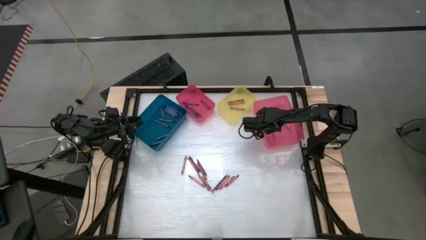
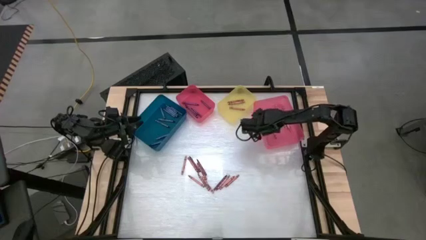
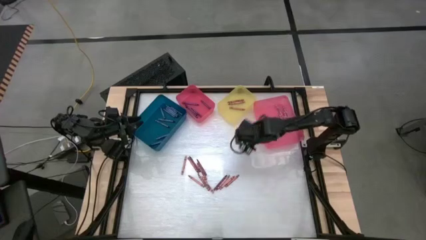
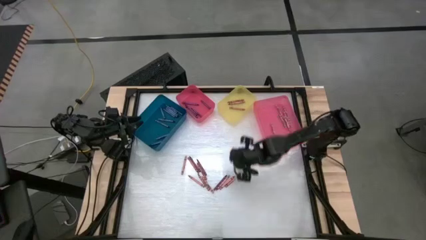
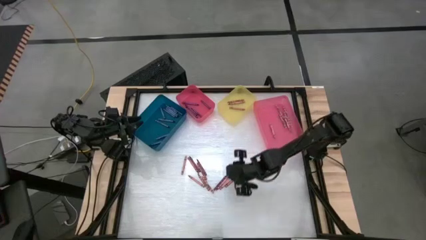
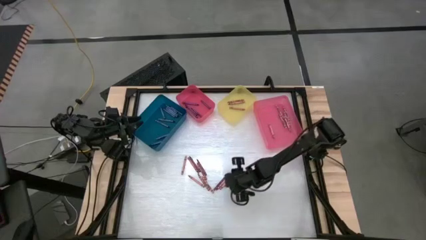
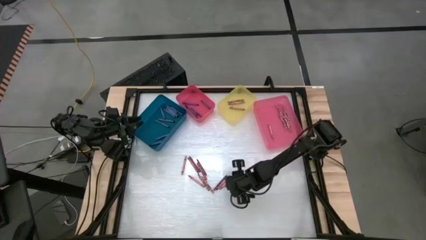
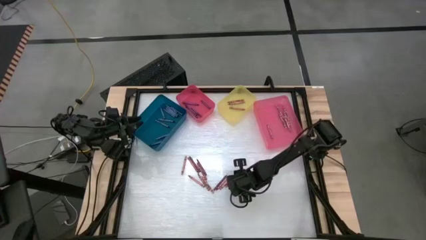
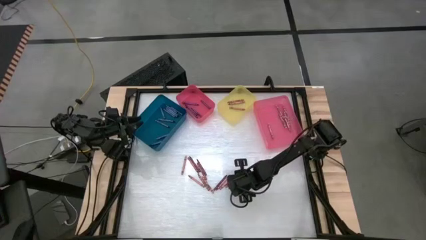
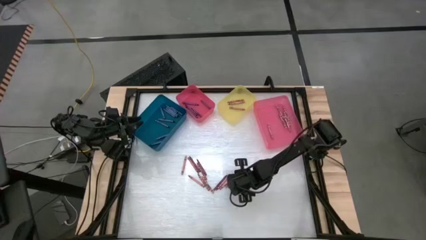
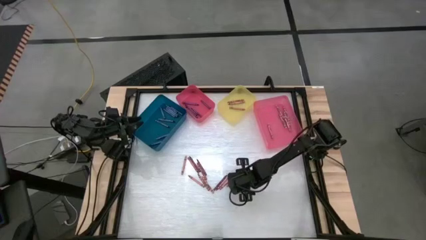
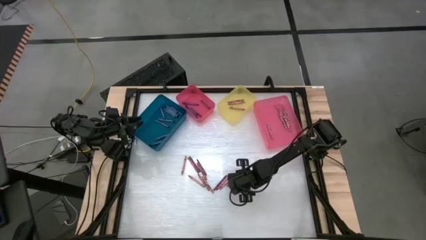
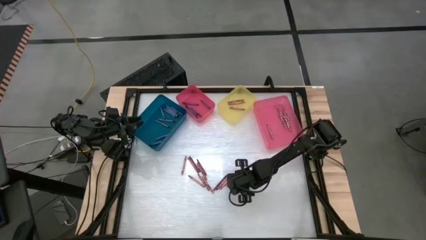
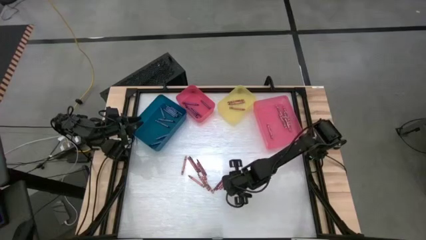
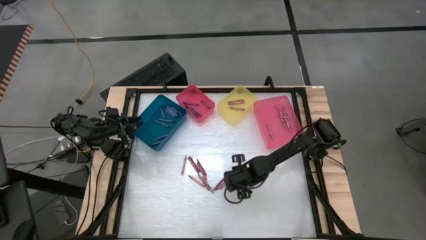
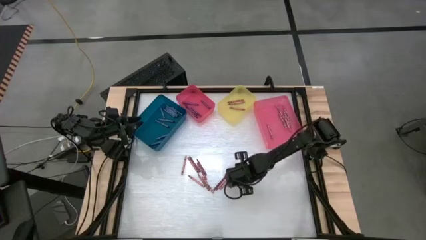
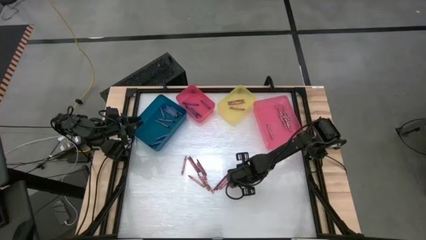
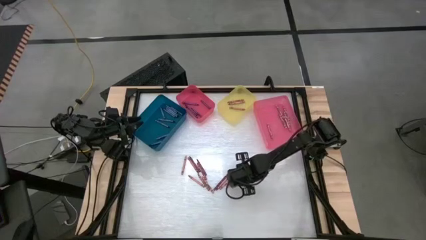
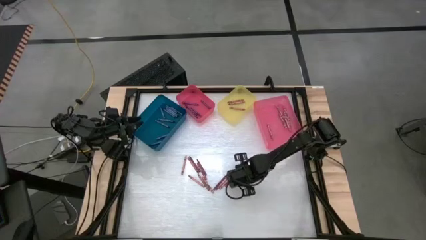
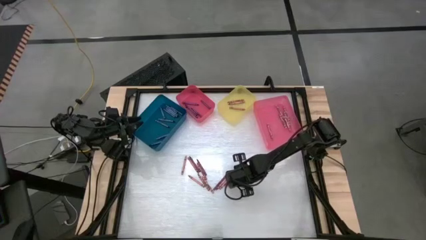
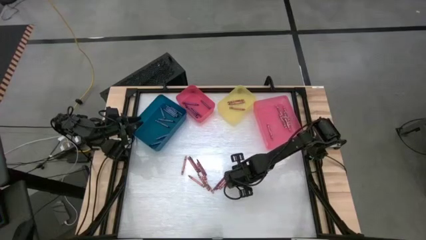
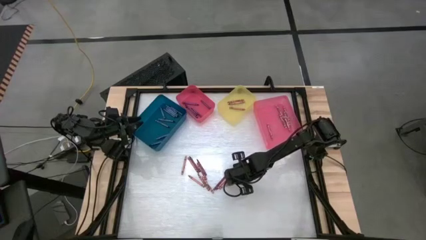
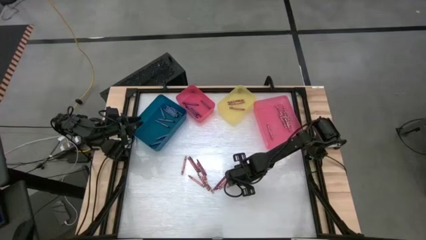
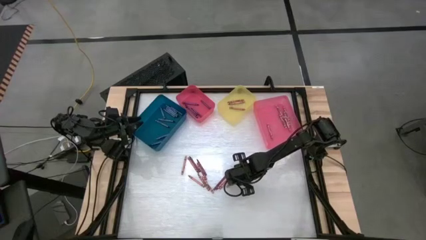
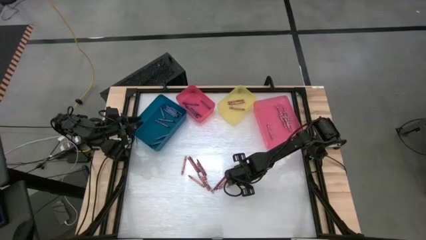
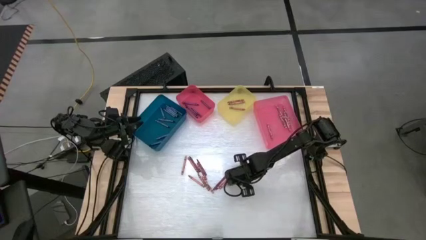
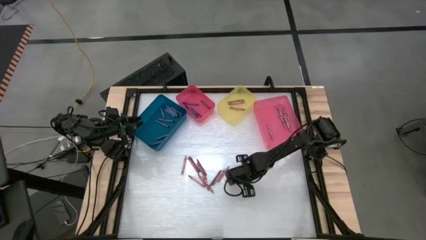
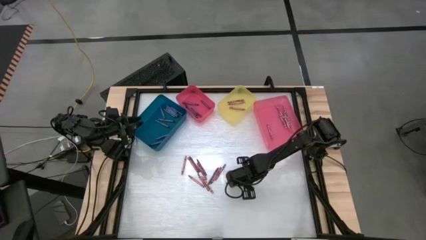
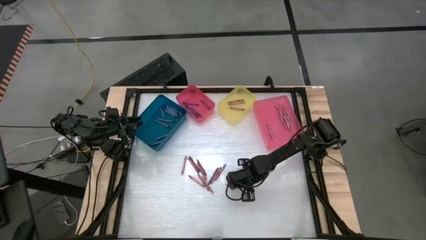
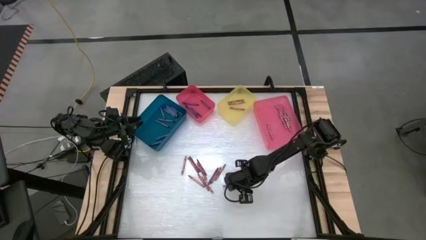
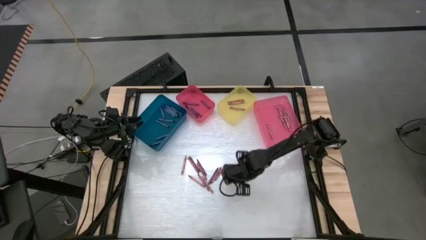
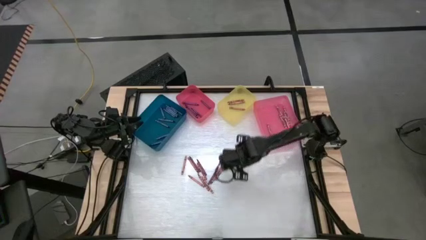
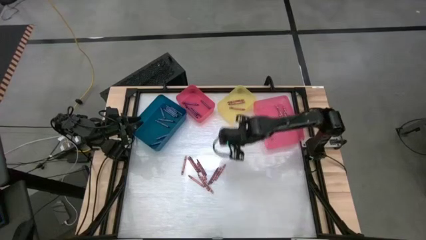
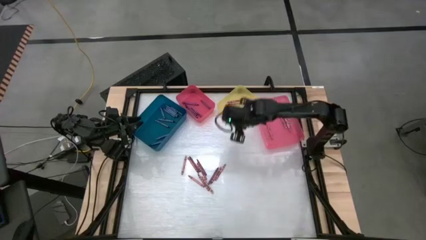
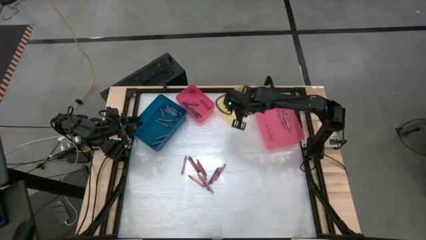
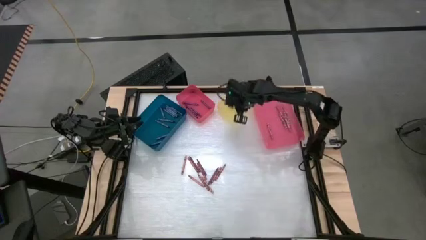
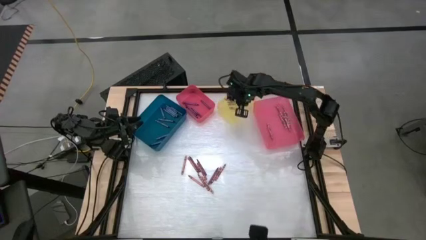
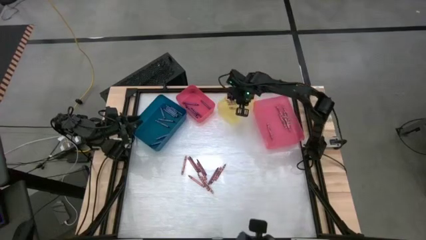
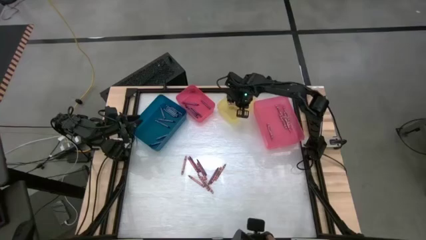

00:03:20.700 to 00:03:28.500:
Task: Sort crayons
Put the red crayon into the yellow bin

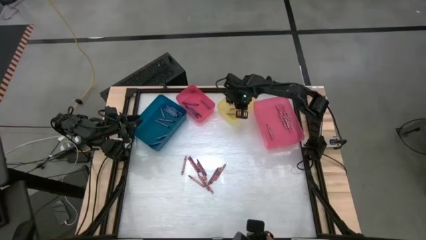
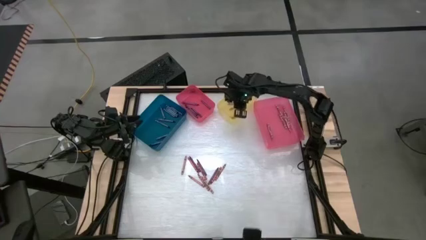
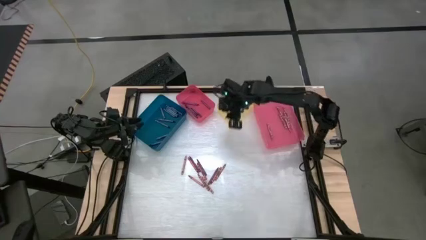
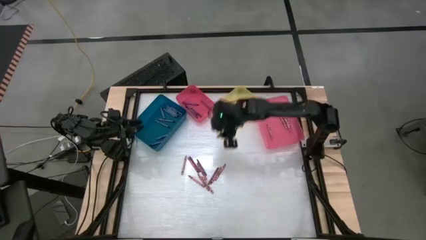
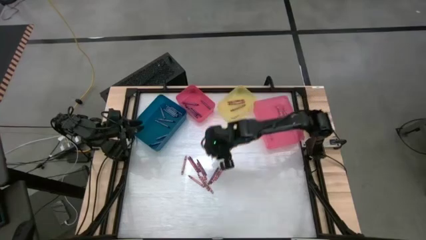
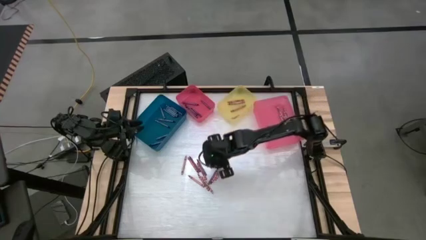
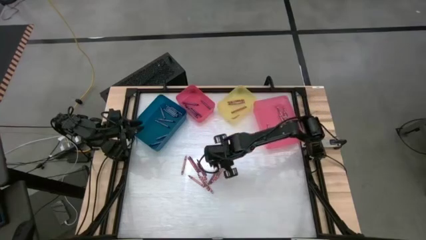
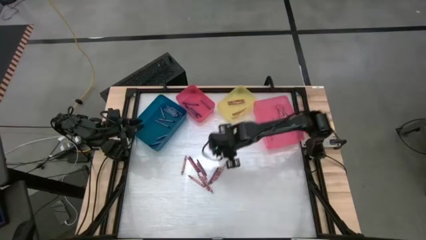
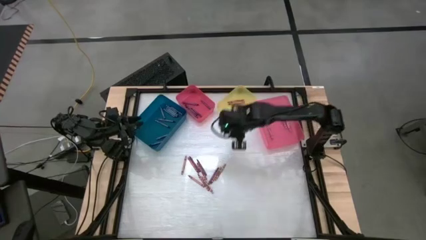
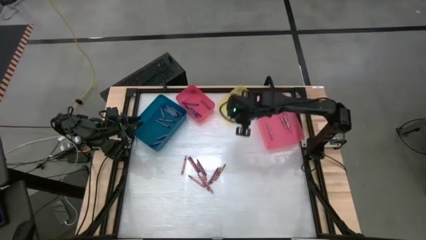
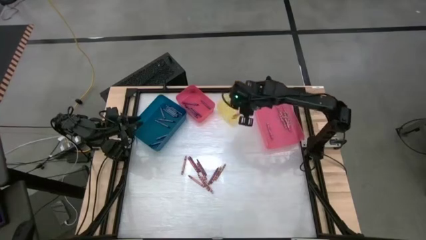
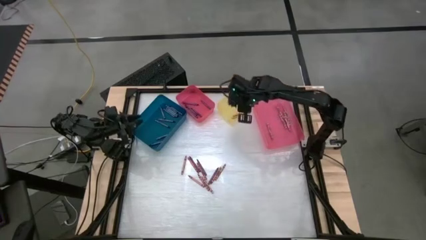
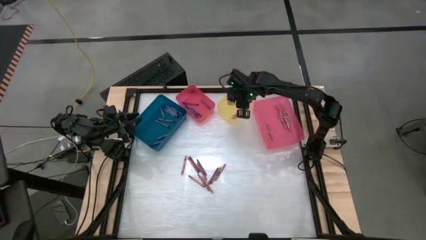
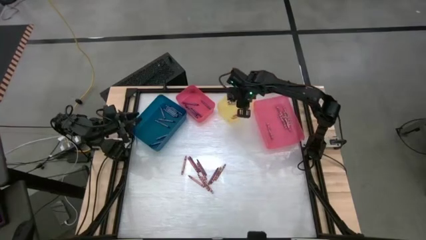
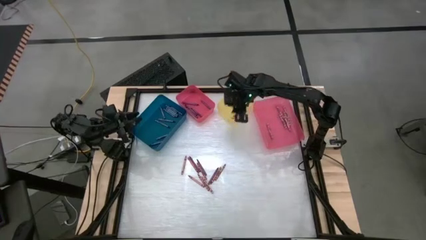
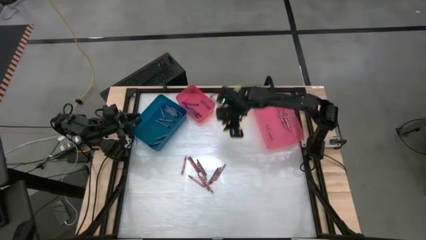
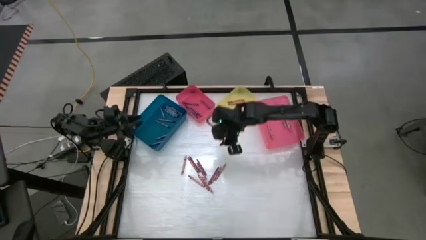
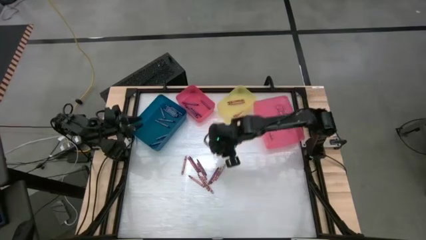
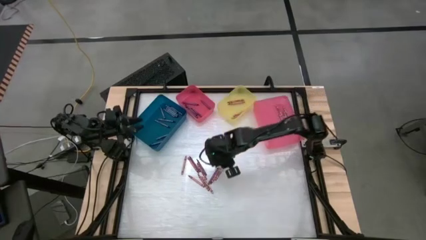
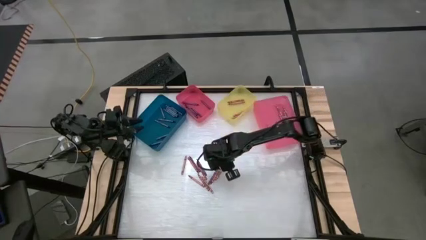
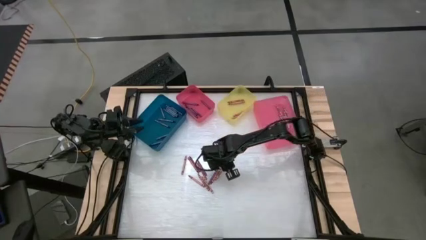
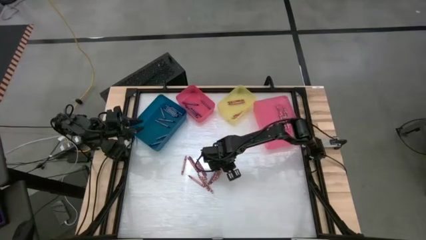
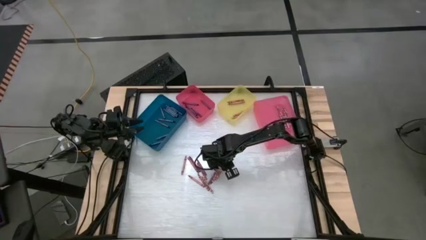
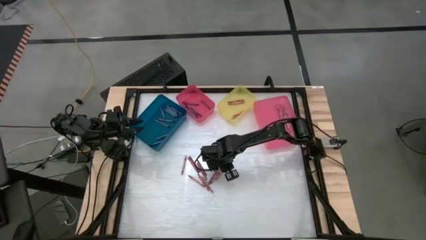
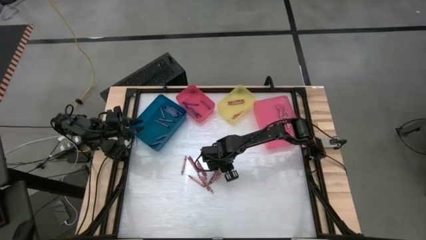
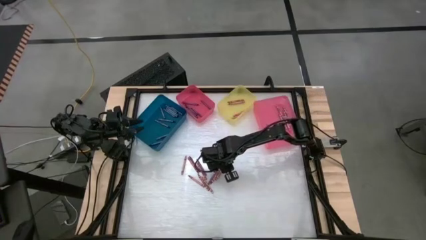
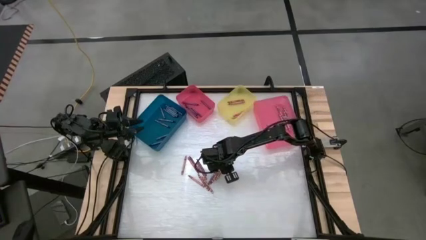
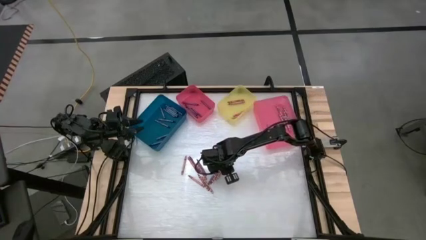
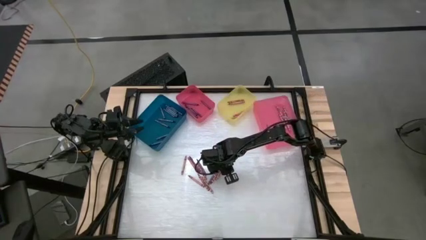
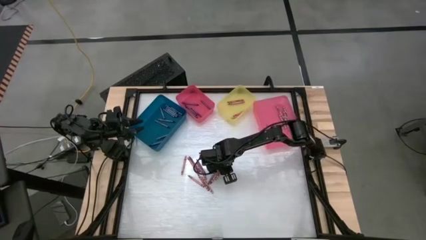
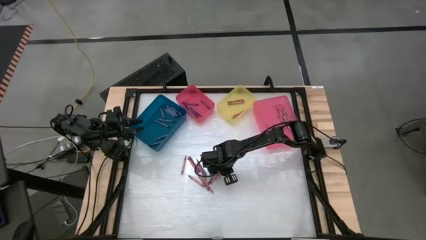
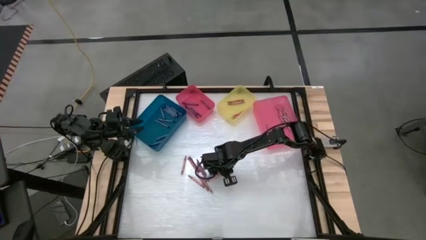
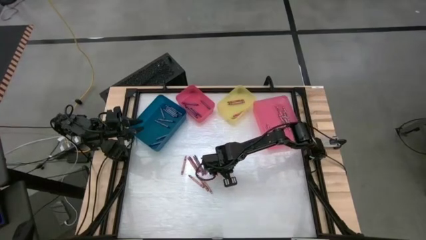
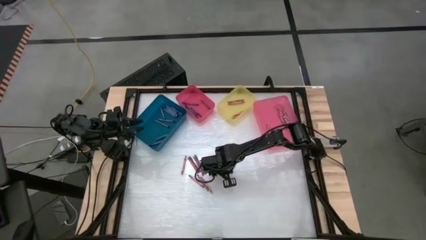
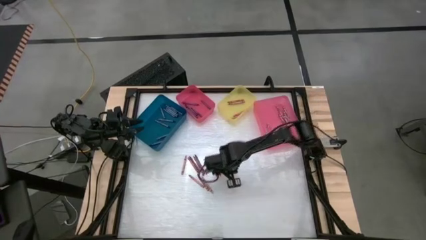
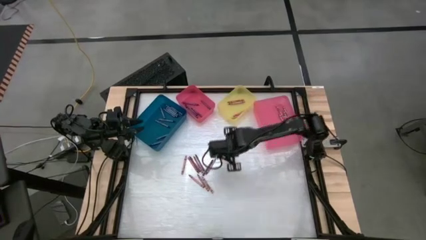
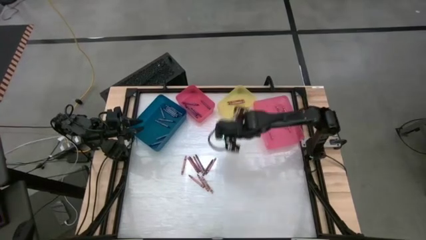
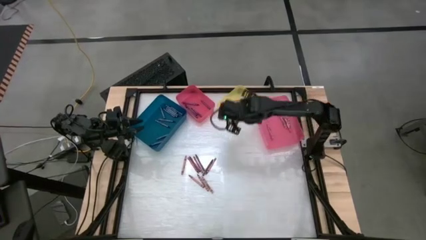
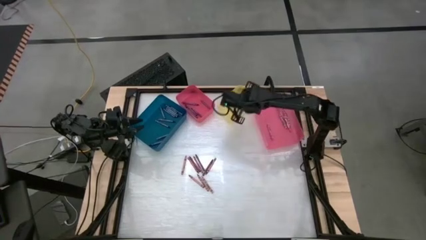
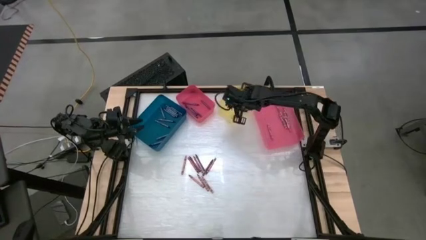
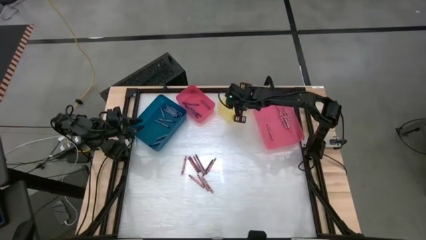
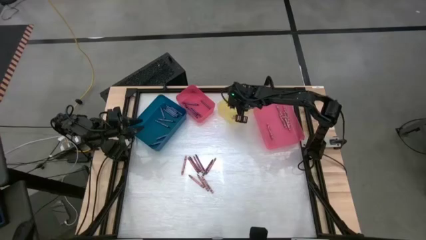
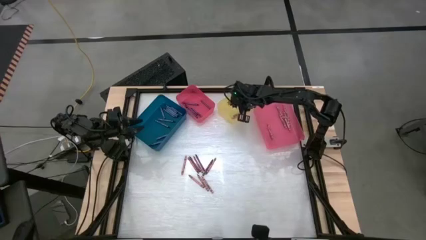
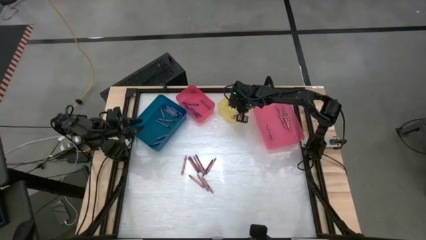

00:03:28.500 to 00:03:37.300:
Put the red crayon into the yellow bin
